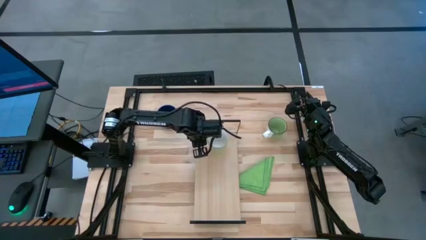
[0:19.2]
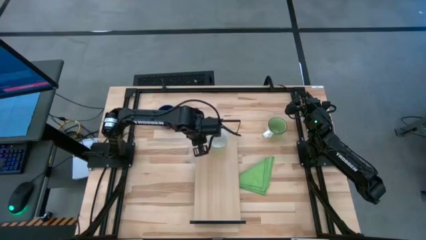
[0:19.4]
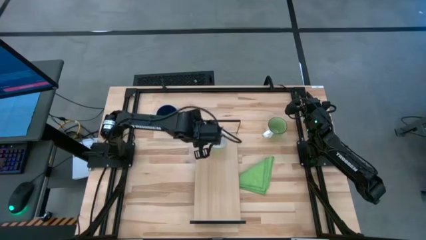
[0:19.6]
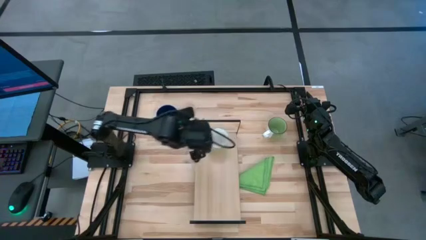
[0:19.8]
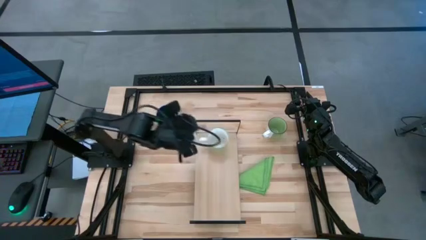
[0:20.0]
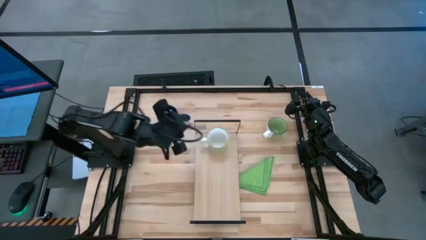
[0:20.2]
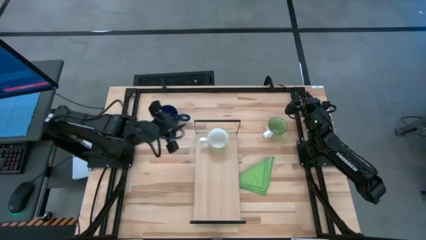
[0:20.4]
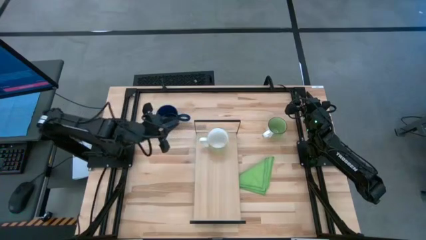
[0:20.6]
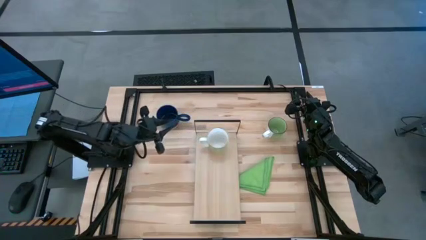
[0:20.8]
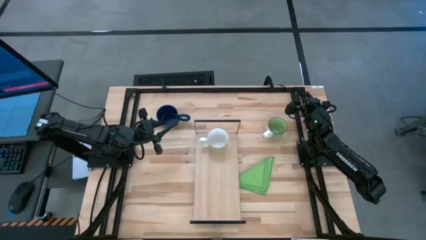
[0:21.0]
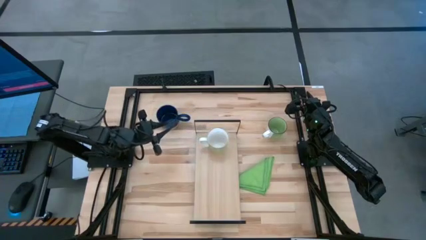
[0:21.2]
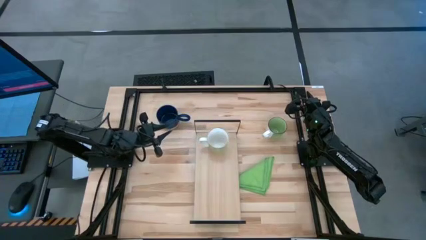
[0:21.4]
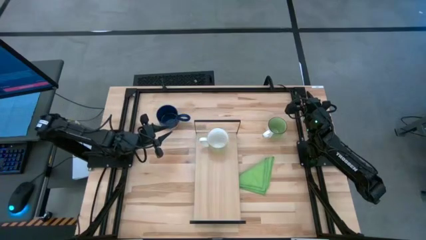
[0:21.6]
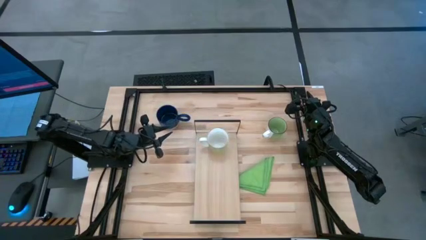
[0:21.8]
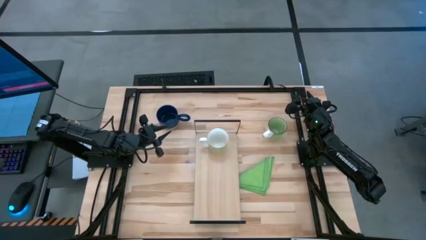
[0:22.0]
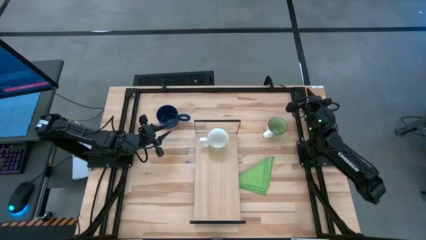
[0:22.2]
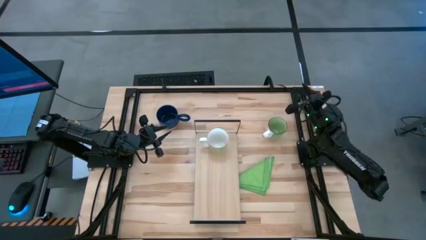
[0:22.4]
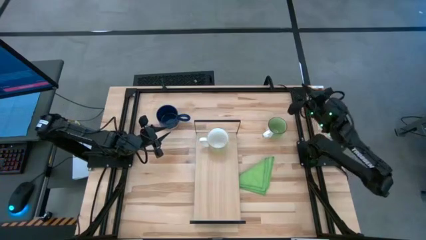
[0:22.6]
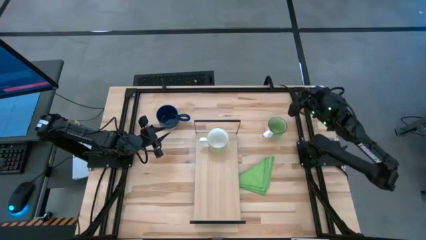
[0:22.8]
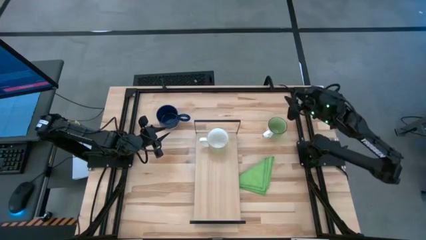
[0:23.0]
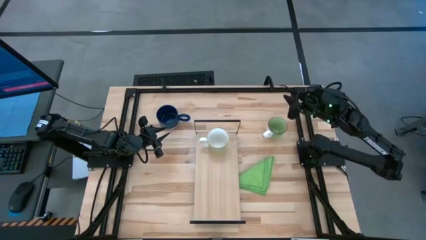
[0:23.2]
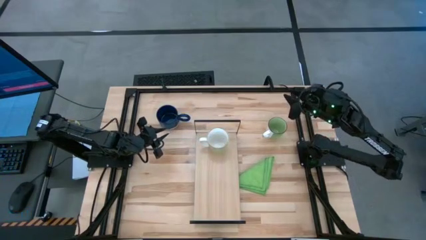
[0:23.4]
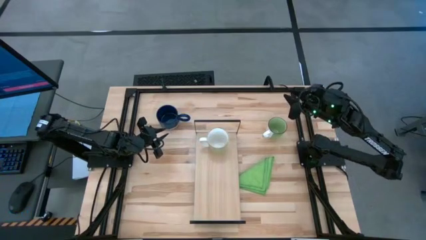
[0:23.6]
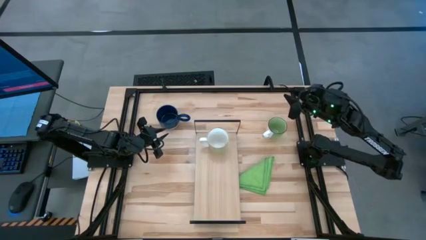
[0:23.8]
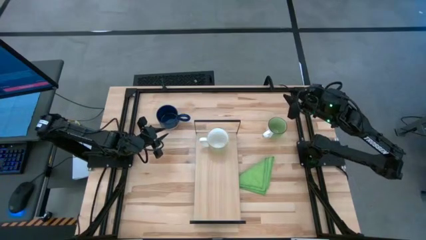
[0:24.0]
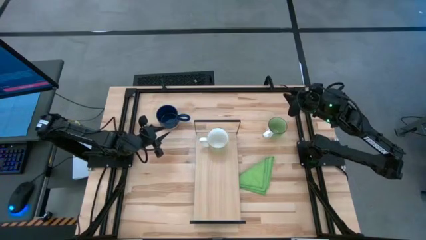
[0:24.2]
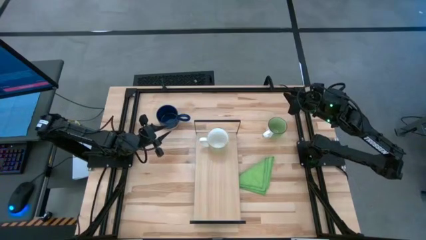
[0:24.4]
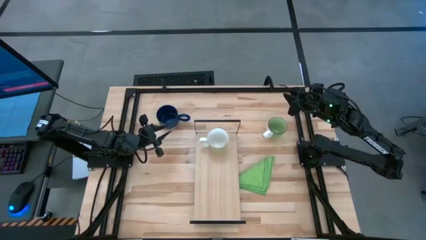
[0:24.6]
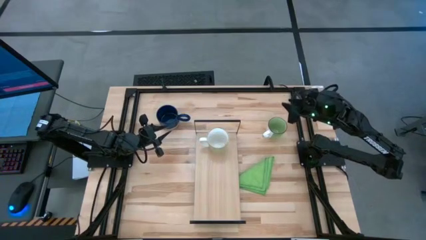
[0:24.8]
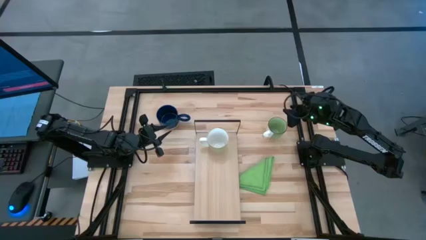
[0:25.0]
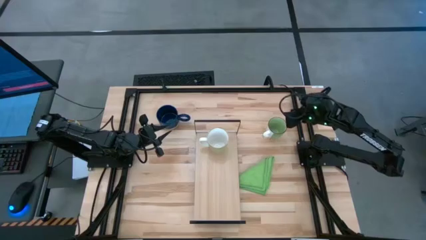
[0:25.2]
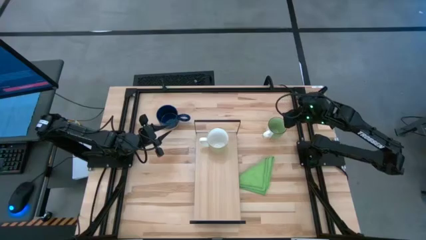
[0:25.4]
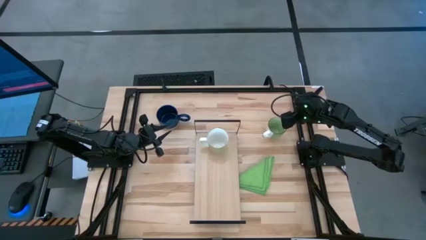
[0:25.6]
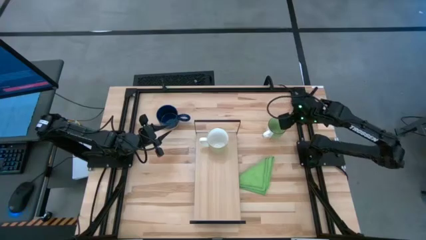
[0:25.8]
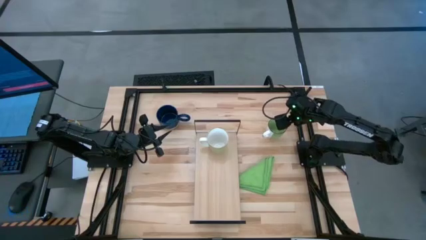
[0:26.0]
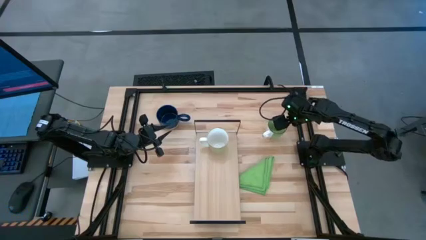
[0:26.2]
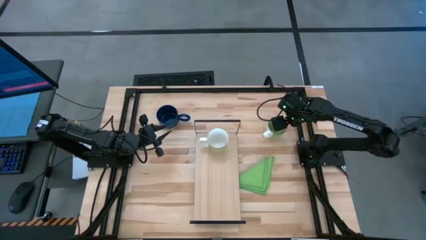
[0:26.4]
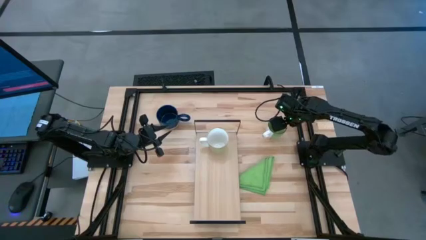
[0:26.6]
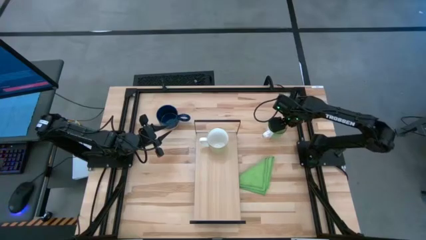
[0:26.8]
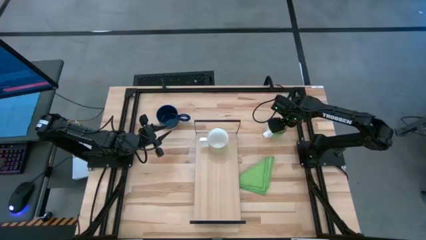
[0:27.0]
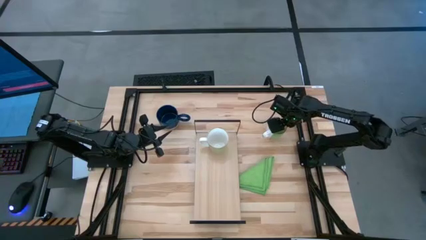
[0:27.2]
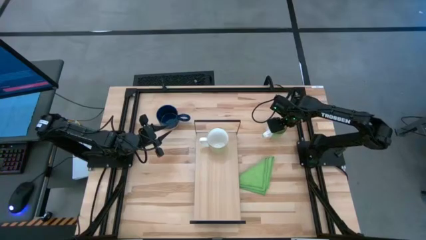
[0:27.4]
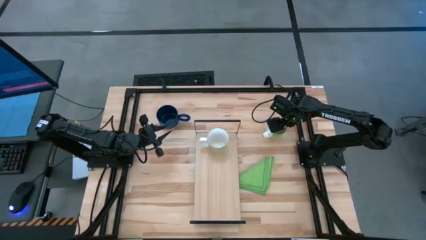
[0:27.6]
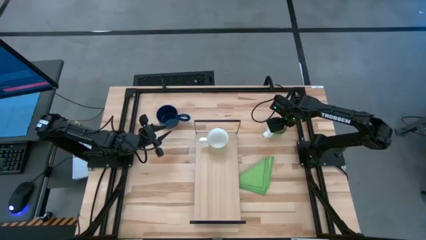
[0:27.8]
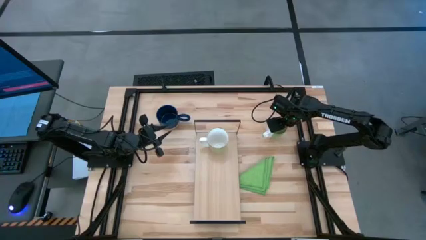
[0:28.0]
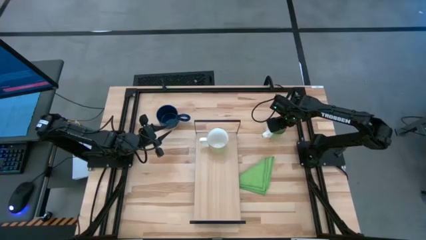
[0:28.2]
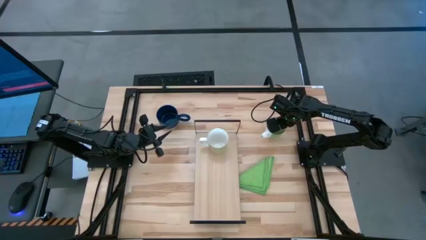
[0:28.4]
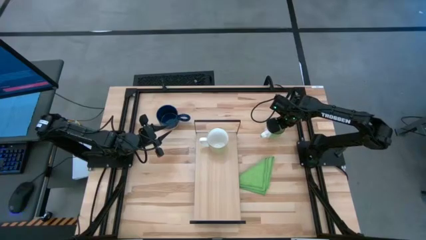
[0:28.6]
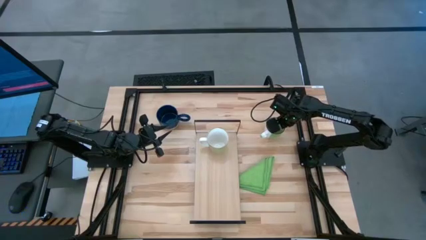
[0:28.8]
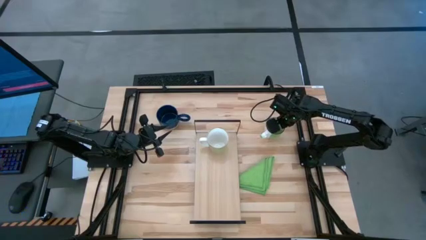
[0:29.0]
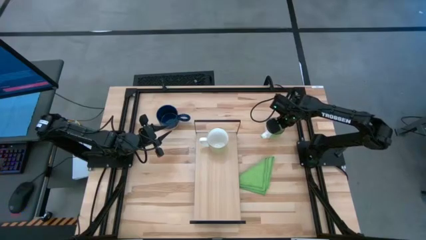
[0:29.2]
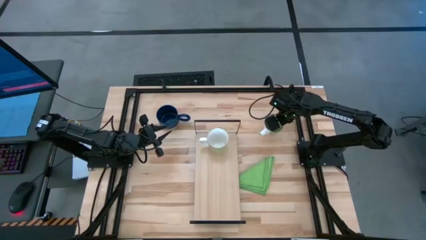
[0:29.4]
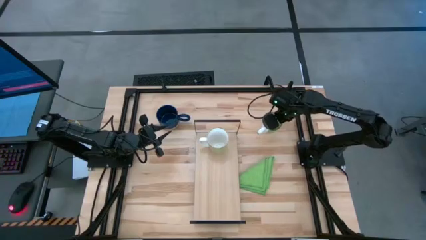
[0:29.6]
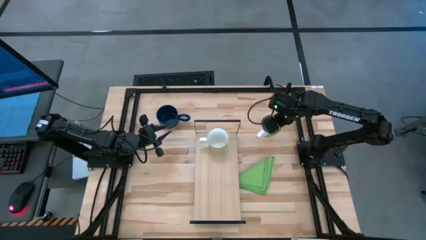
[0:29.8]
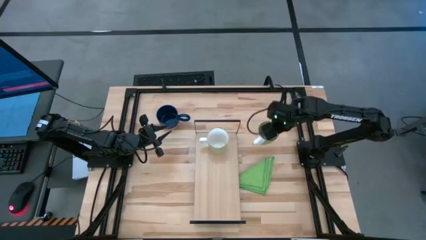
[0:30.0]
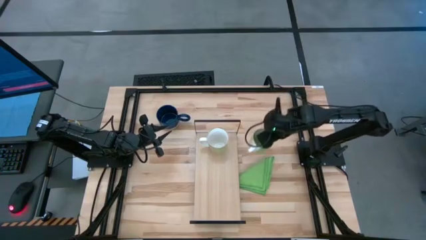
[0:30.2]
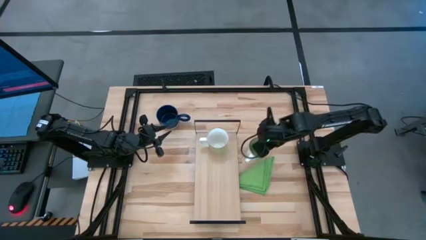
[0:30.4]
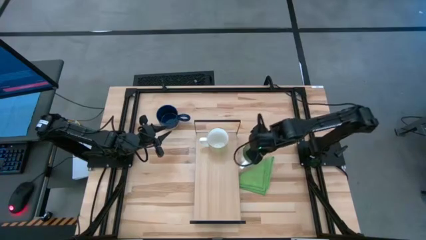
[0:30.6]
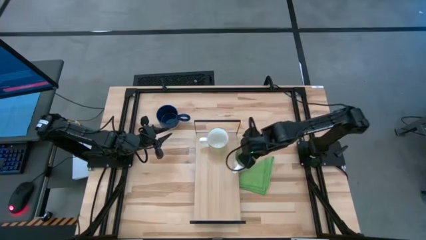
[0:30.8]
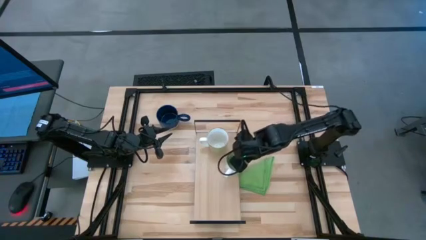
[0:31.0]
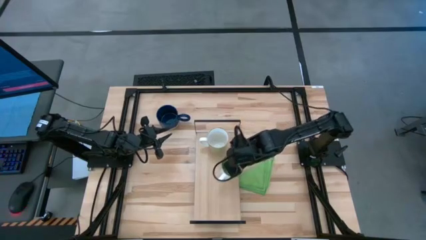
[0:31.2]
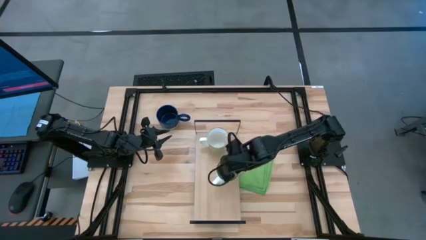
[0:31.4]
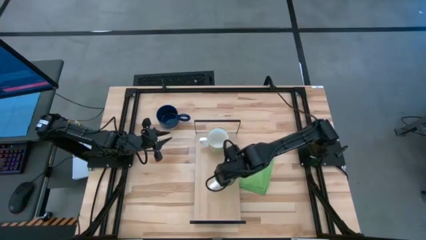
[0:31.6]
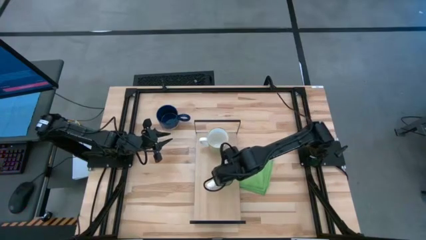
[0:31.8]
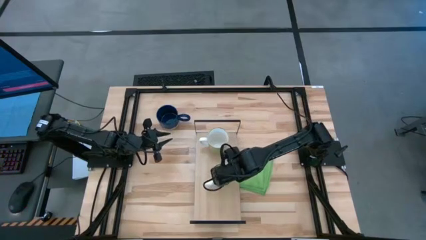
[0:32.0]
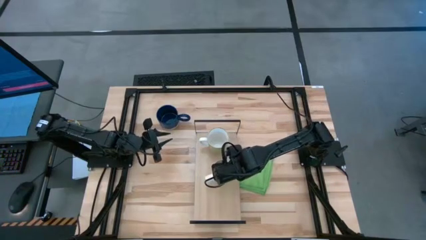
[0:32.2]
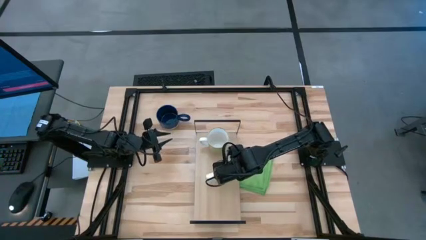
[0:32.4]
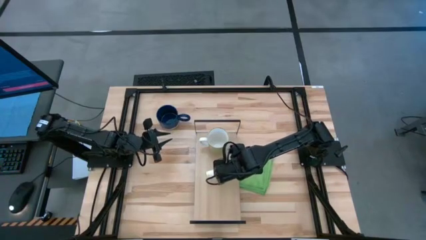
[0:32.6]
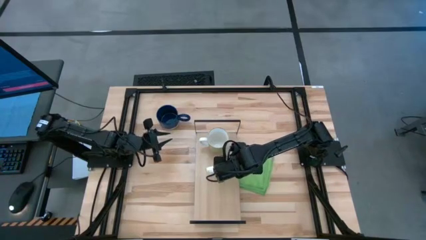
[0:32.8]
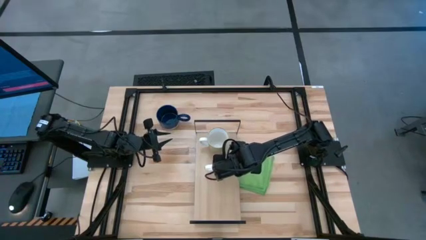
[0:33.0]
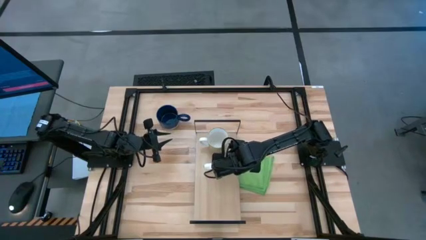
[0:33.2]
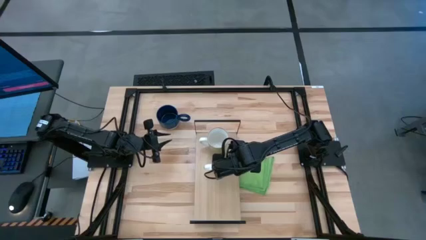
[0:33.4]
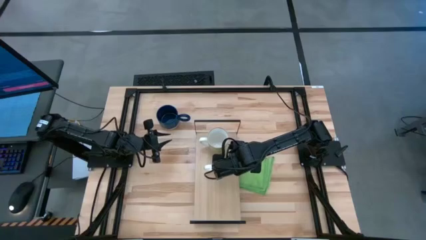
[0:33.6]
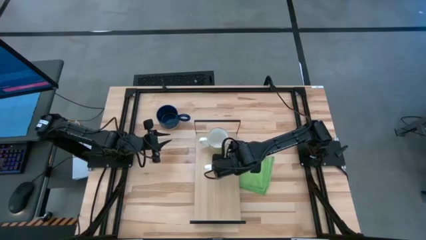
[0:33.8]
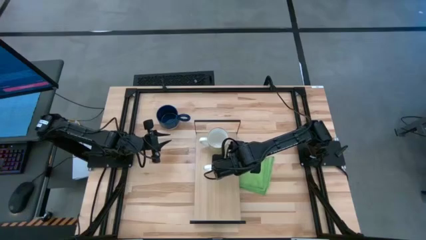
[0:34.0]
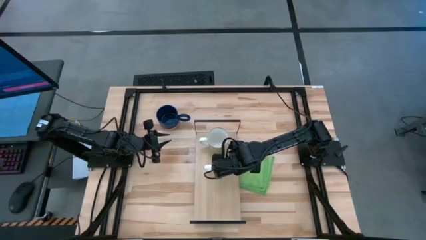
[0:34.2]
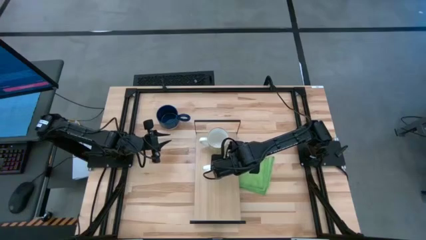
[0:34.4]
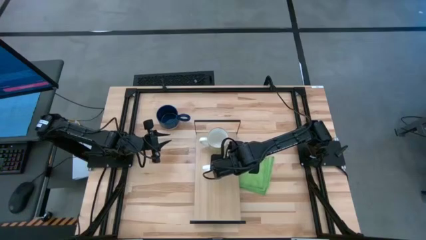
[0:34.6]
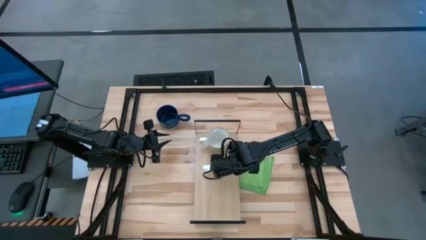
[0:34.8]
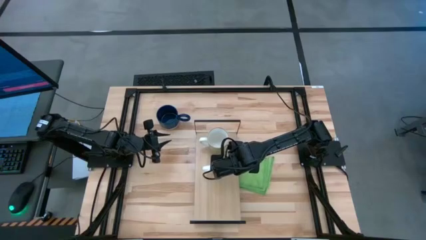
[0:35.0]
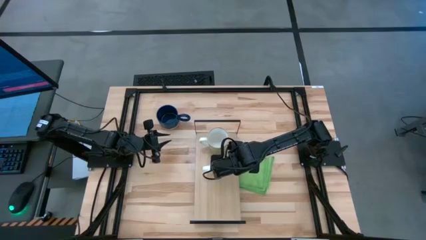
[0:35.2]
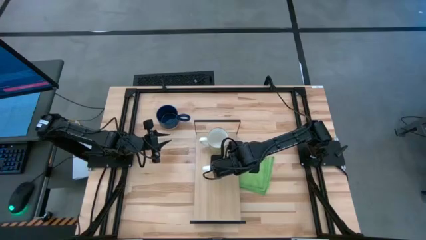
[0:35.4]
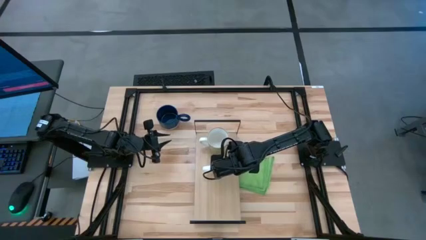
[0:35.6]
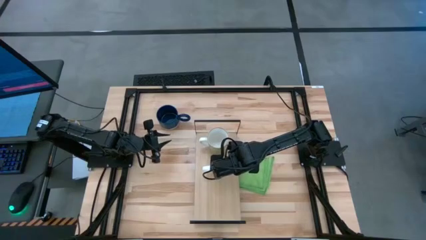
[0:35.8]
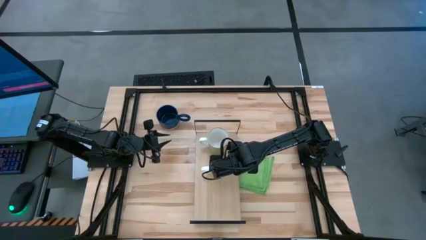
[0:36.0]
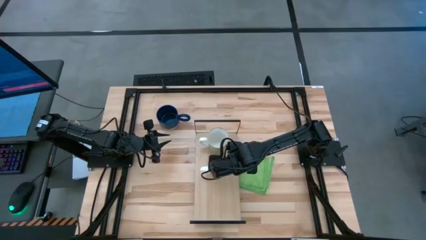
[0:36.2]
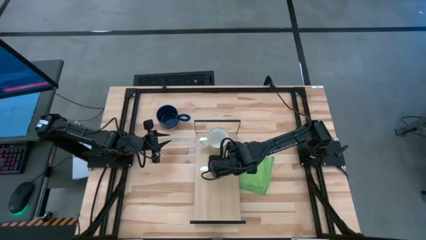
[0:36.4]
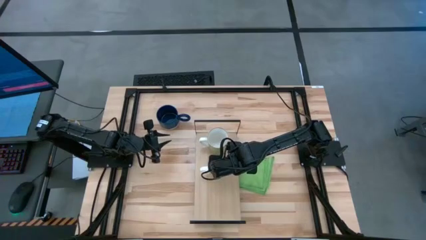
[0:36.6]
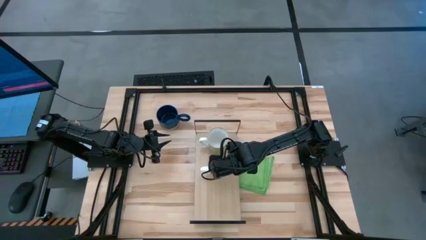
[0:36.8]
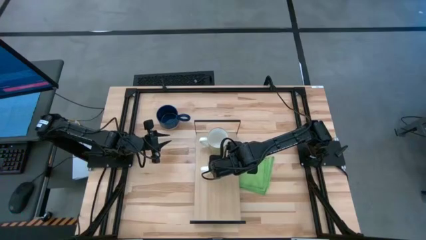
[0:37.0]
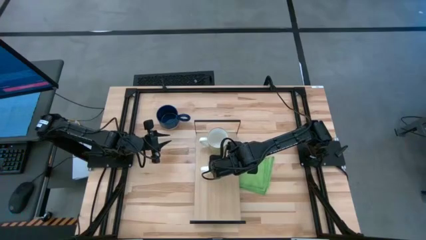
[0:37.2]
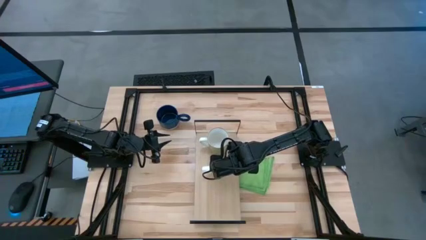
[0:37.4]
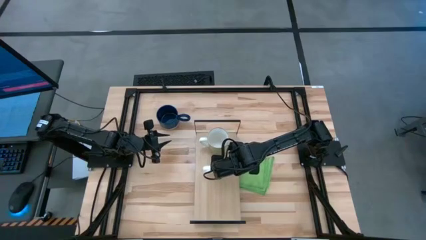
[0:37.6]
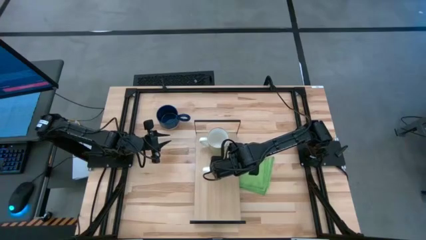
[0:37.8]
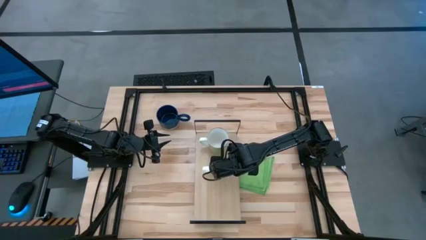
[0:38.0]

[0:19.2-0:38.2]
Task: Stack small to large cups/mugs on shelf
Put the green mug on the shelf
